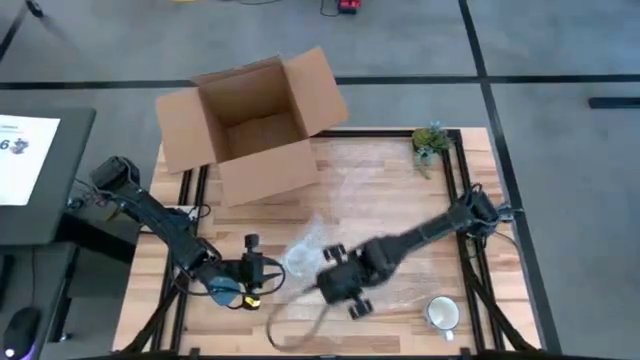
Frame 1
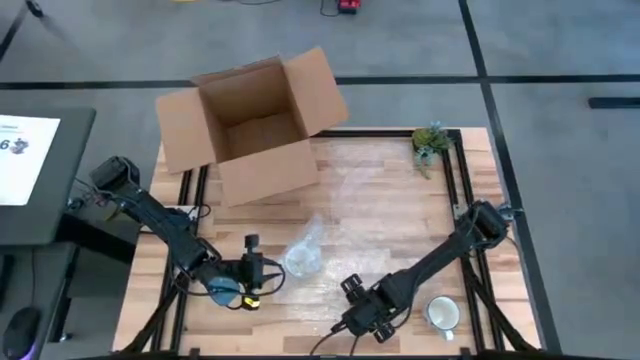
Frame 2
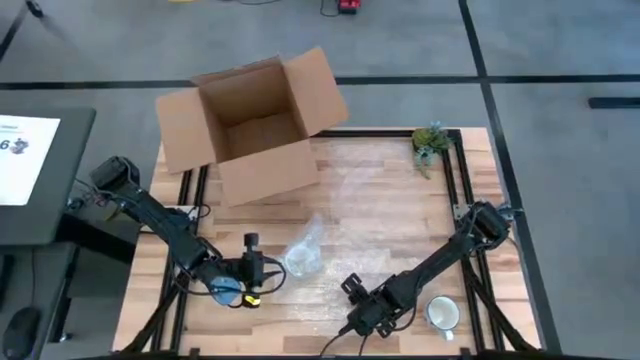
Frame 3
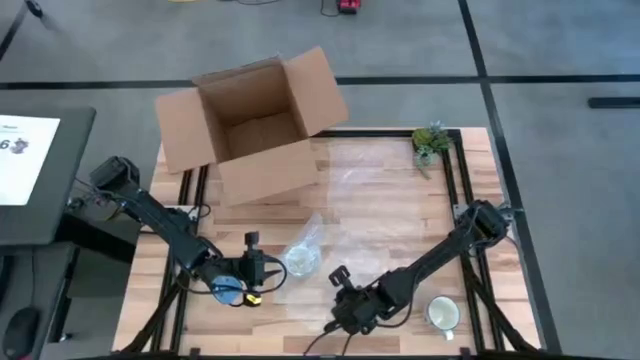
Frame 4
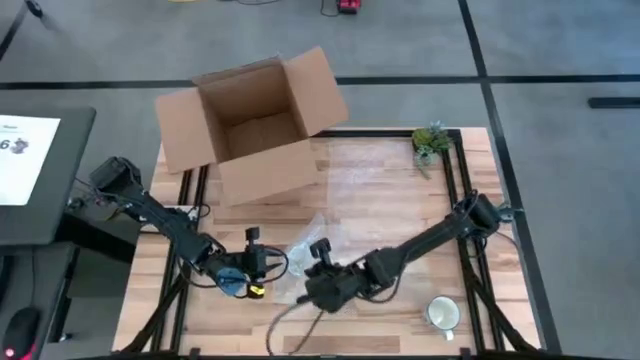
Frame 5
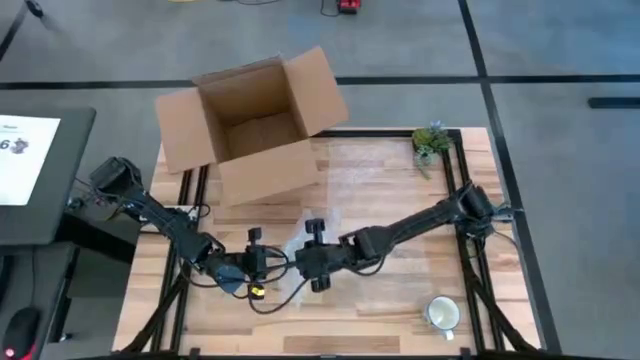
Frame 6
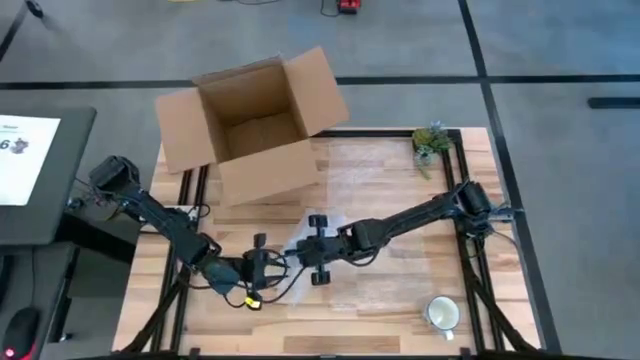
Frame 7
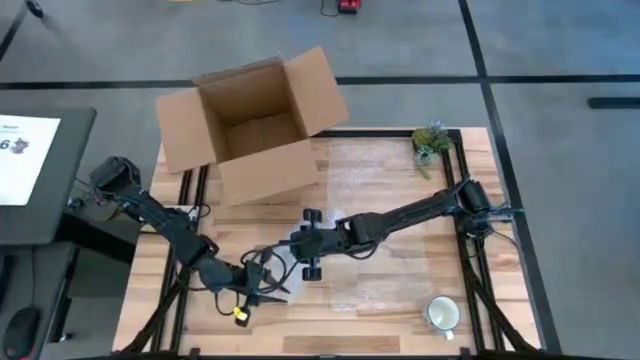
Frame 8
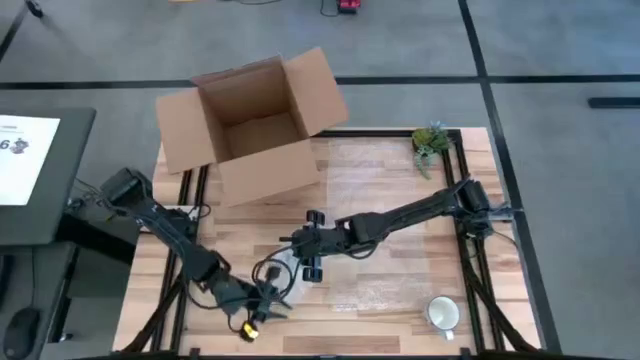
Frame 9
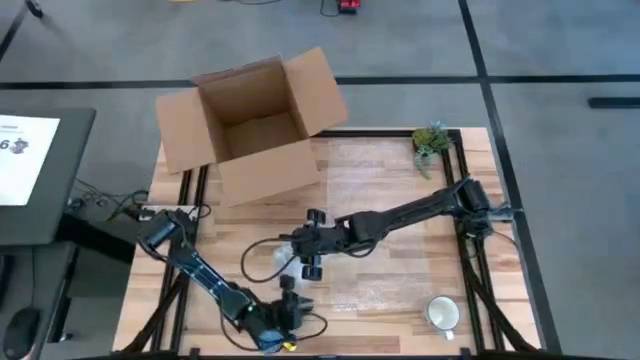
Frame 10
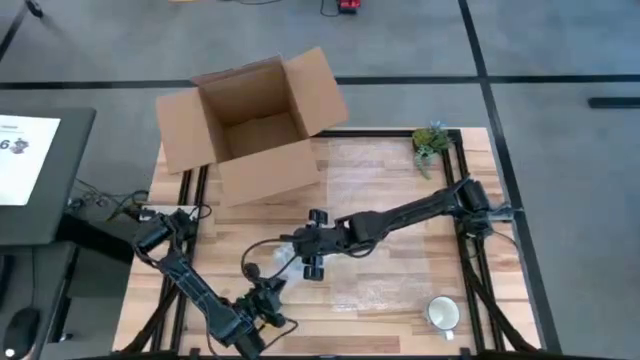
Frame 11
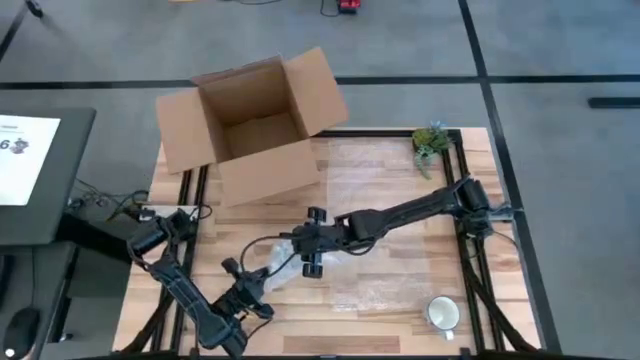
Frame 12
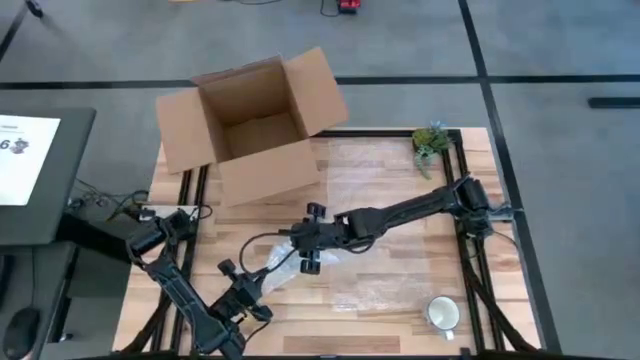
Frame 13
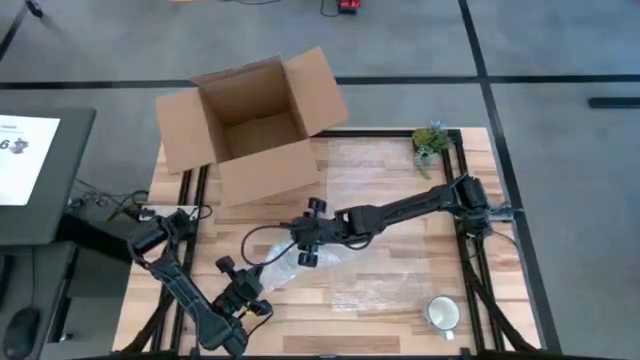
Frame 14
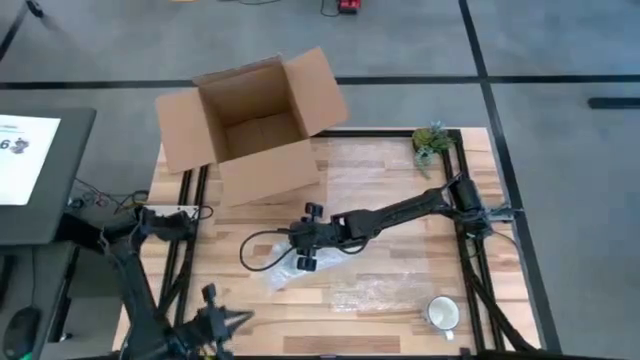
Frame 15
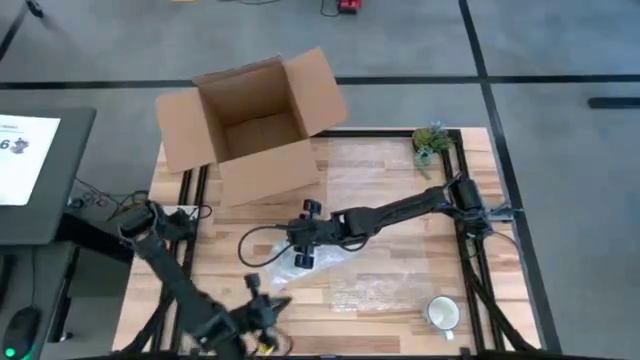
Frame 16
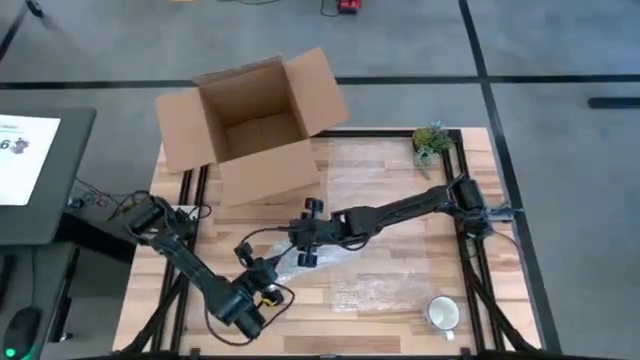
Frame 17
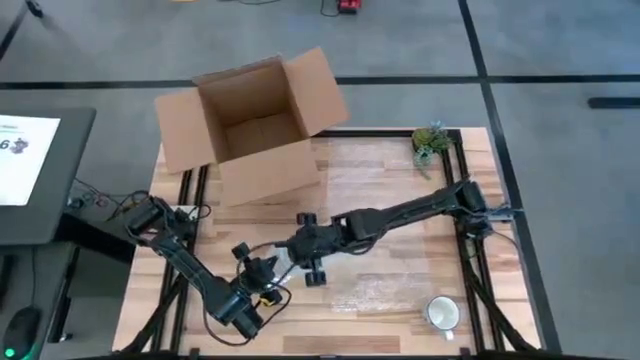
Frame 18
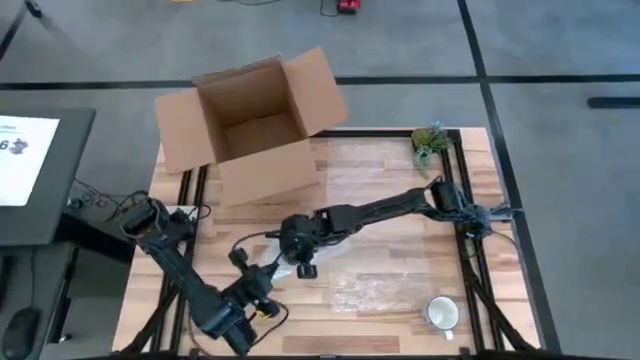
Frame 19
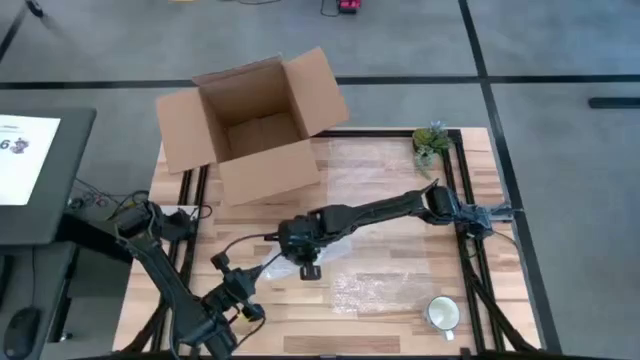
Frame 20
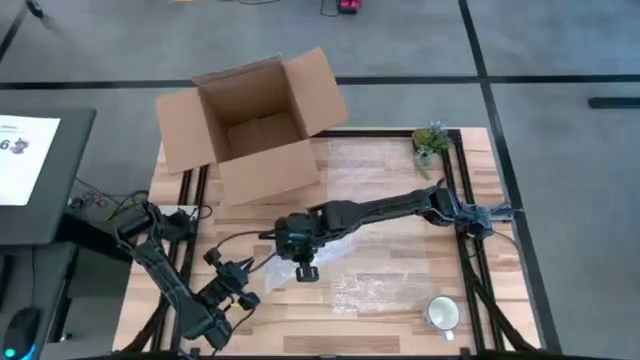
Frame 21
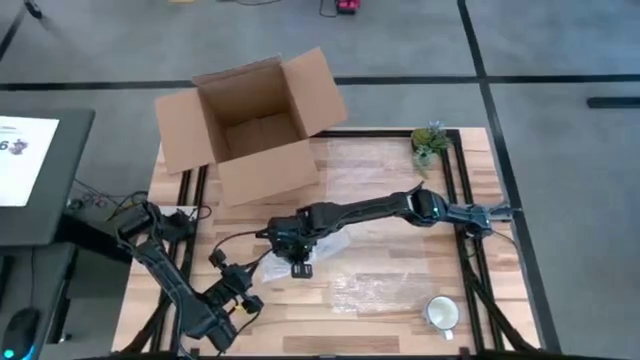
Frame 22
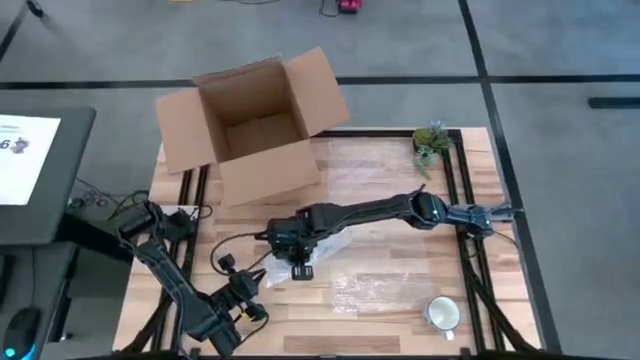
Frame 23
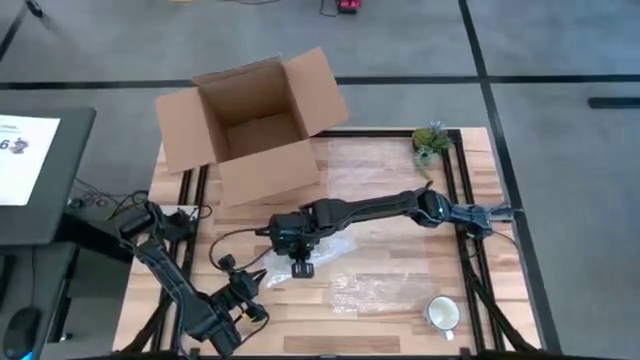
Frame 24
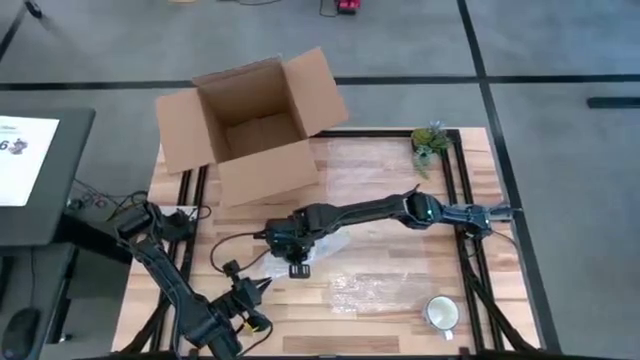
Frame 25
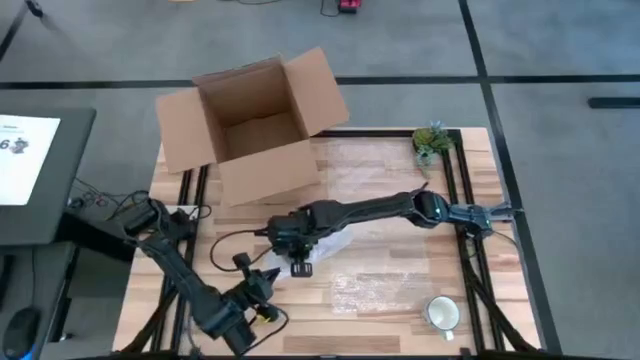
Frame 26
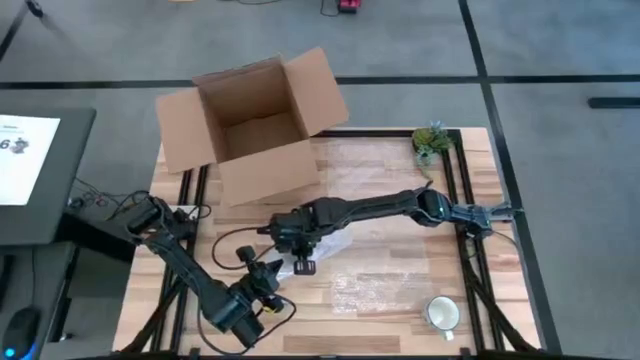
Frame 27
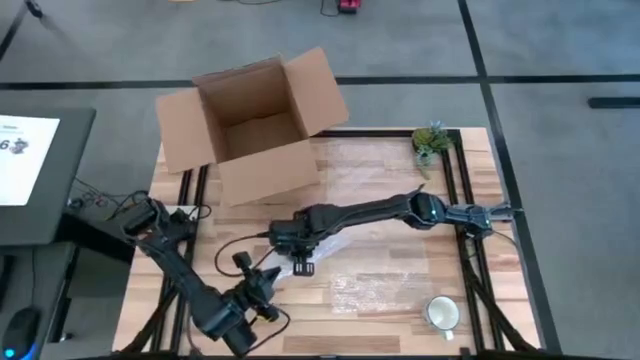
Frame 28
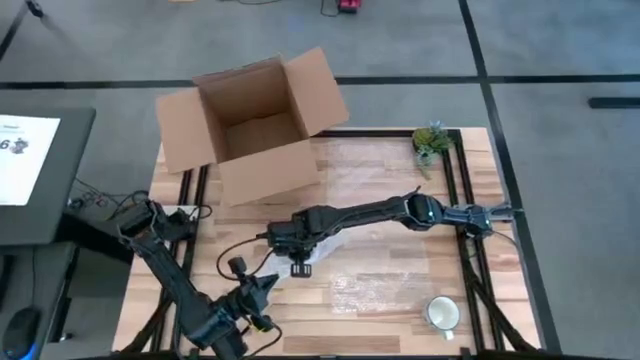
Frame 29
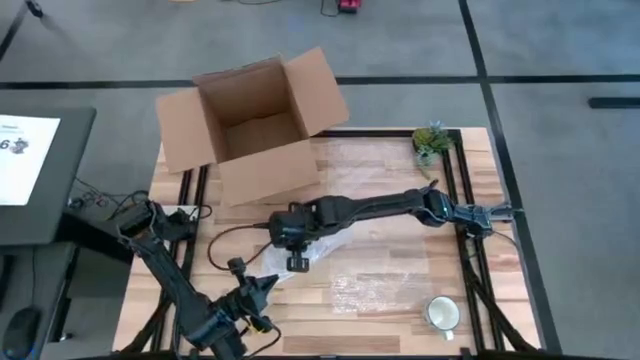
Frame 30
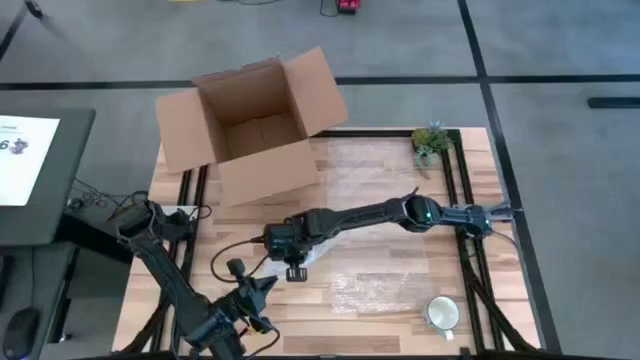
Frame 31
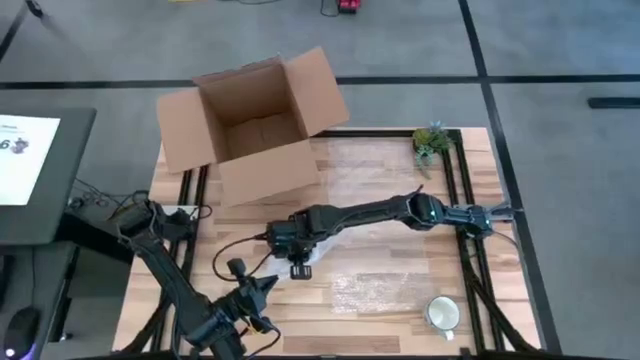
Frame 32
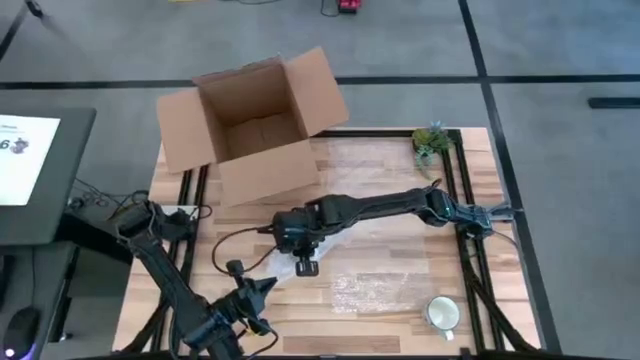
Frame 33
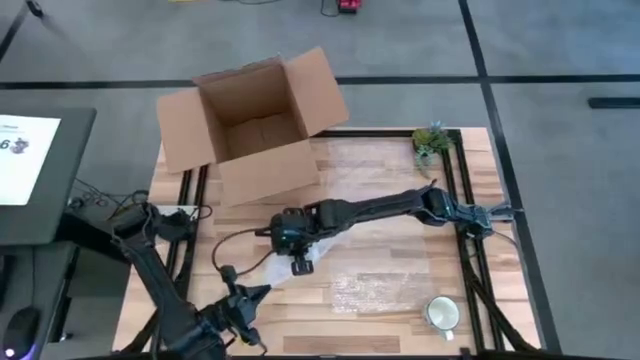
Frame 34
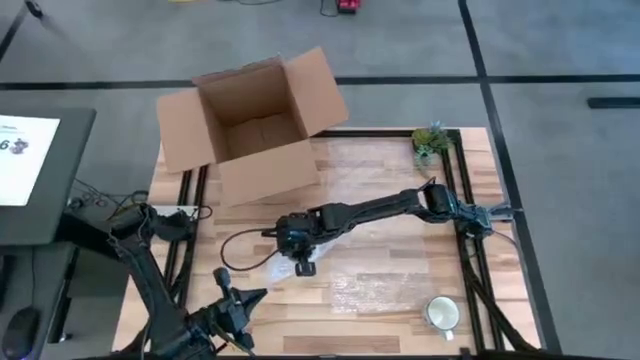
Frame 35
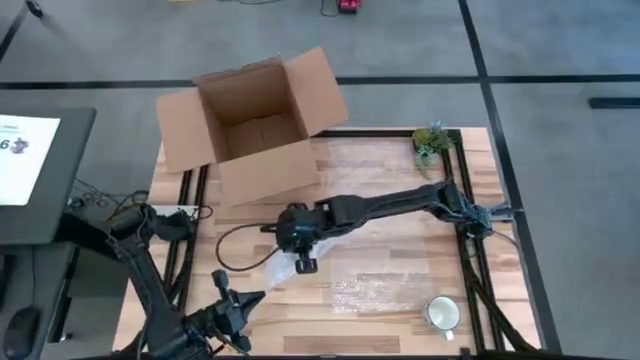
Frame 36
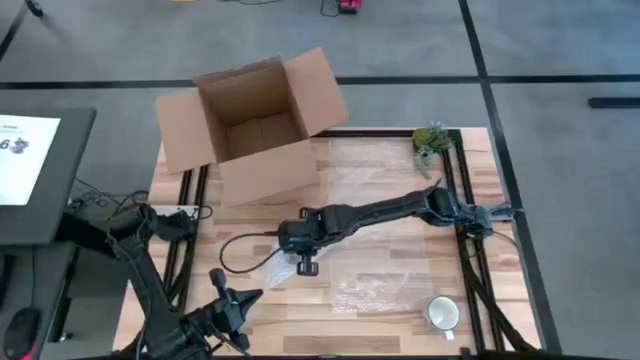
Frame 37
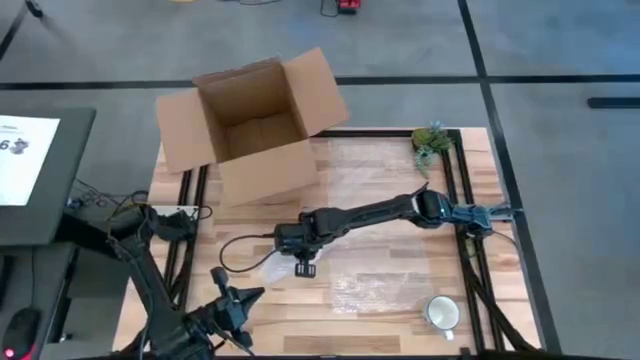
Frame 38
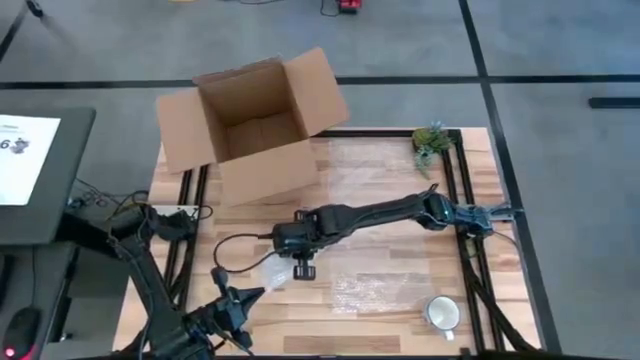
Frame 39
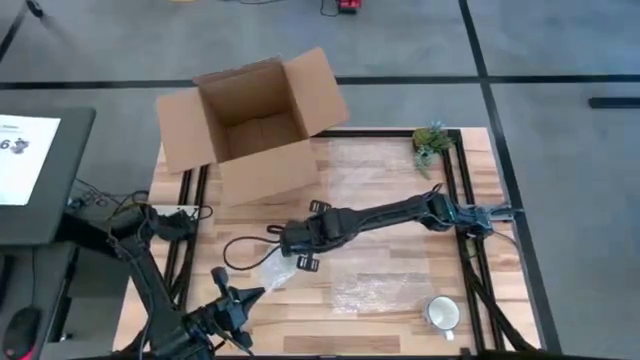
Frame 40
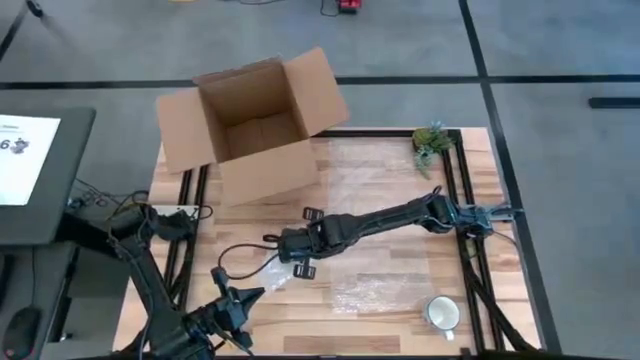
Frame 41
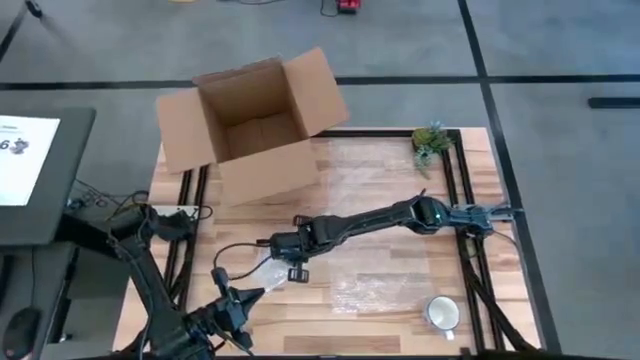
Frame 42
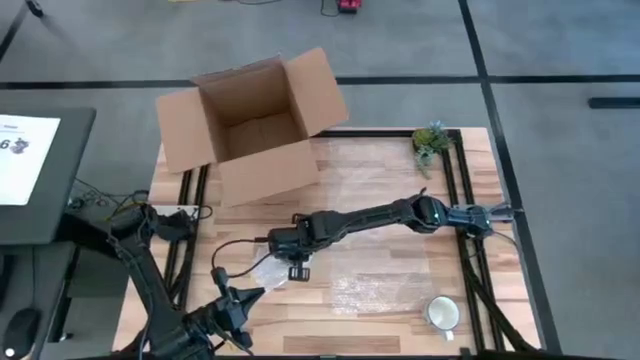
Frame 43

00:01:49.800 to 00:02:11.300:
Task: wrap mug
Wrap the green patterned mug with the bubble wrap
